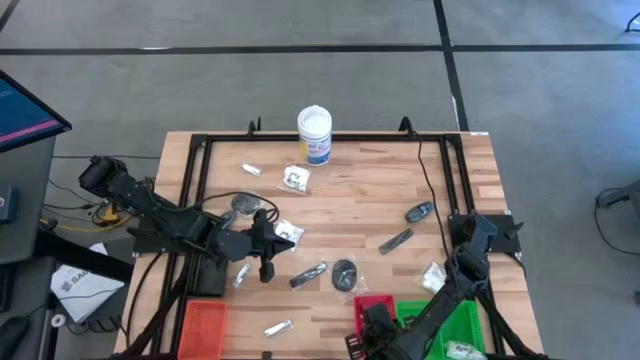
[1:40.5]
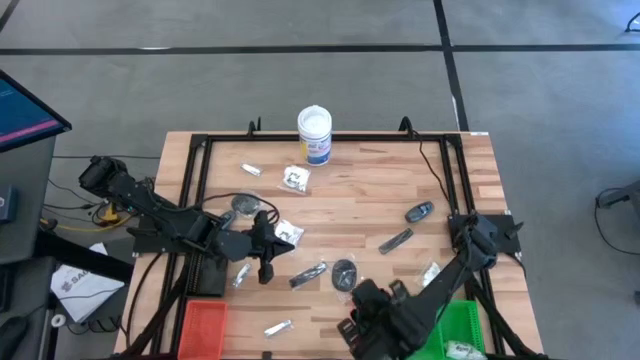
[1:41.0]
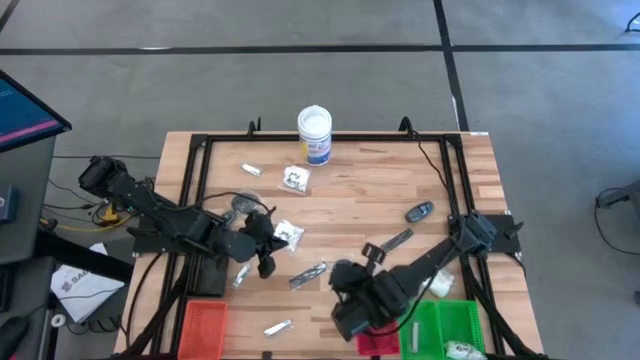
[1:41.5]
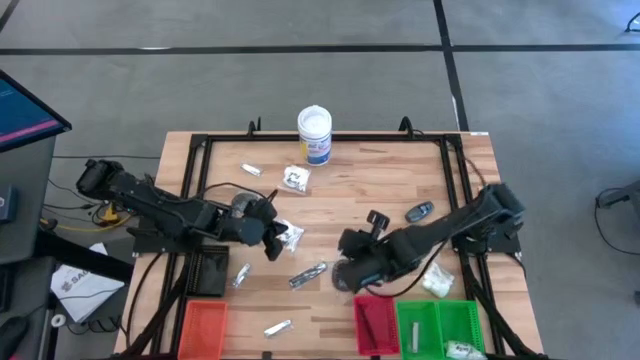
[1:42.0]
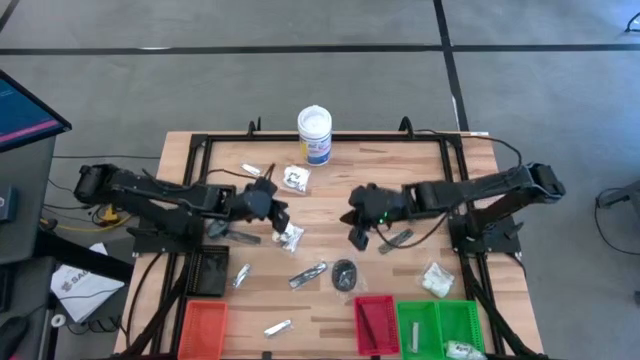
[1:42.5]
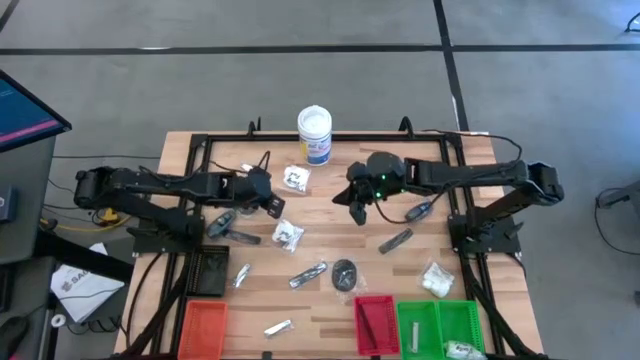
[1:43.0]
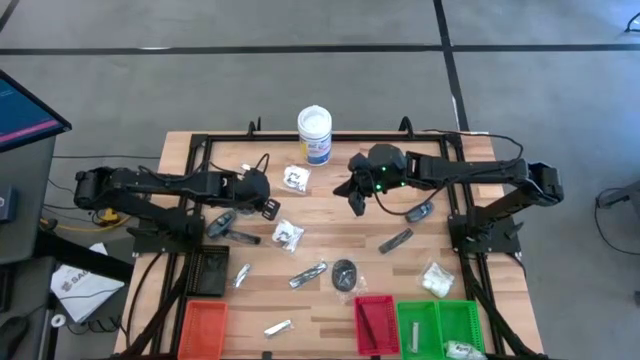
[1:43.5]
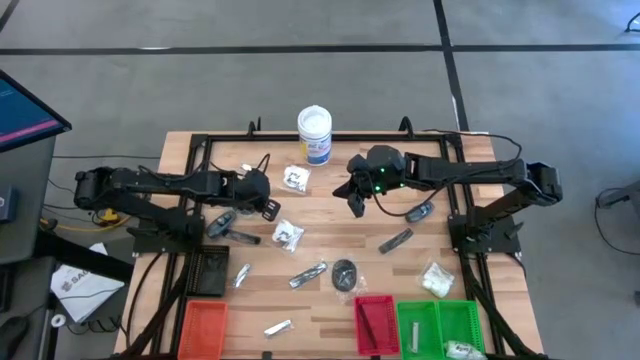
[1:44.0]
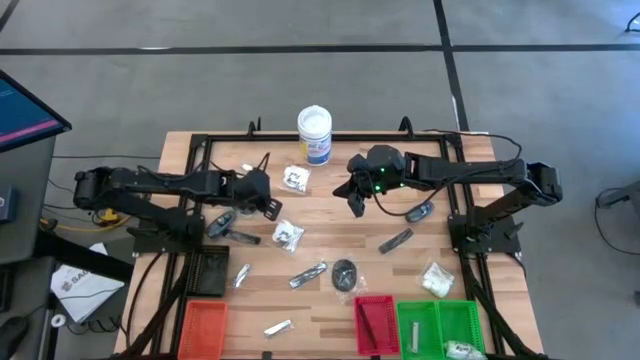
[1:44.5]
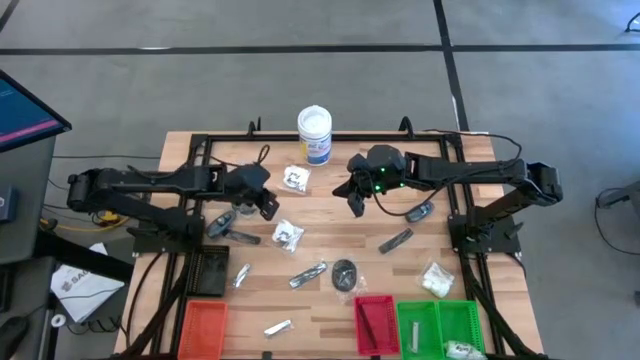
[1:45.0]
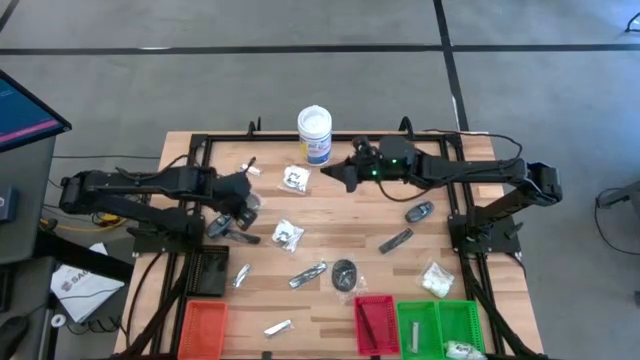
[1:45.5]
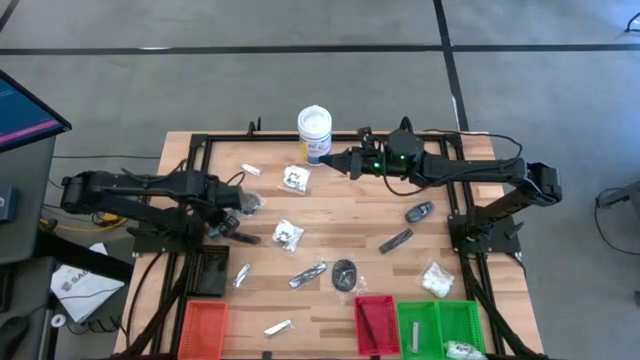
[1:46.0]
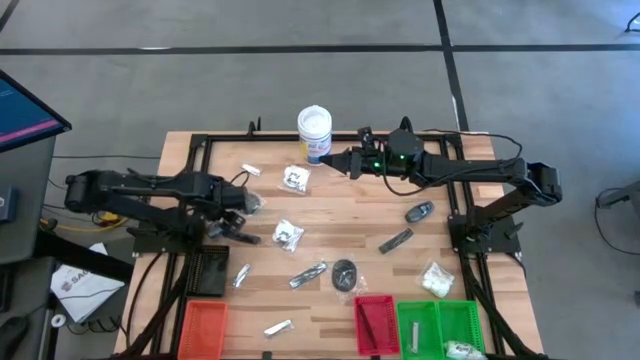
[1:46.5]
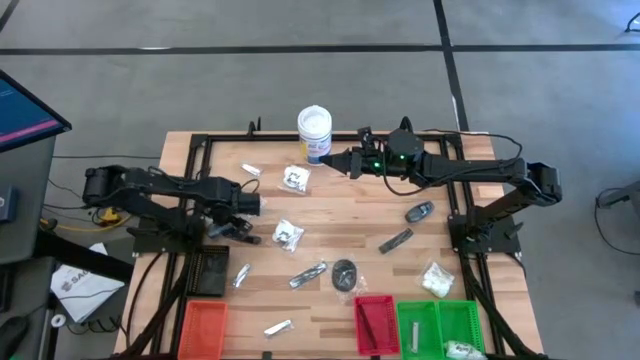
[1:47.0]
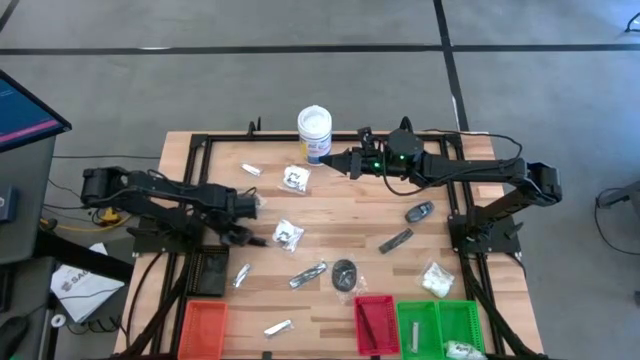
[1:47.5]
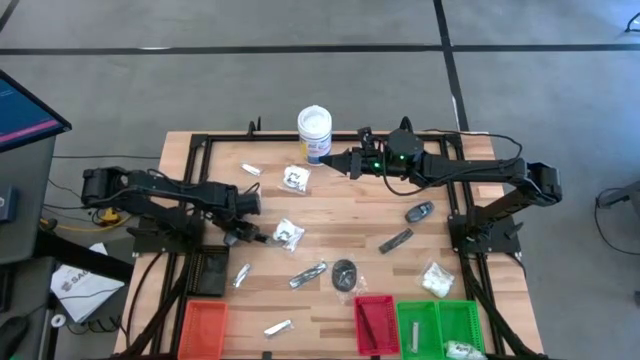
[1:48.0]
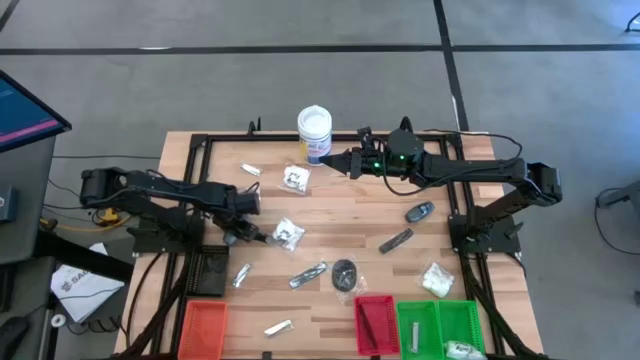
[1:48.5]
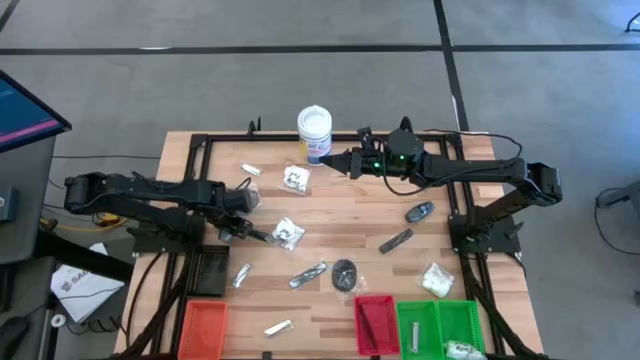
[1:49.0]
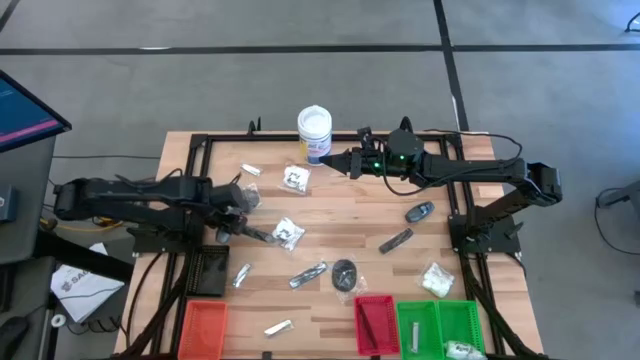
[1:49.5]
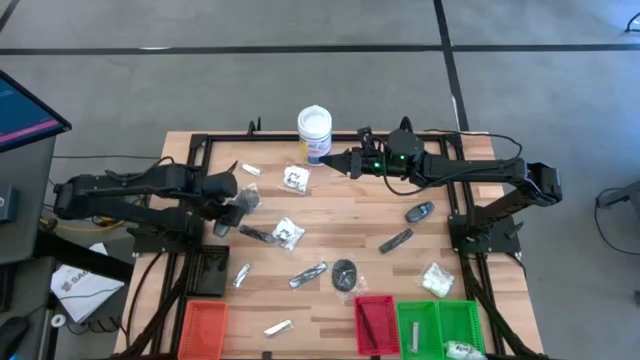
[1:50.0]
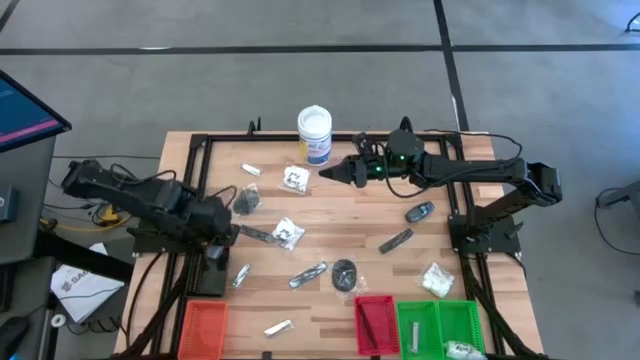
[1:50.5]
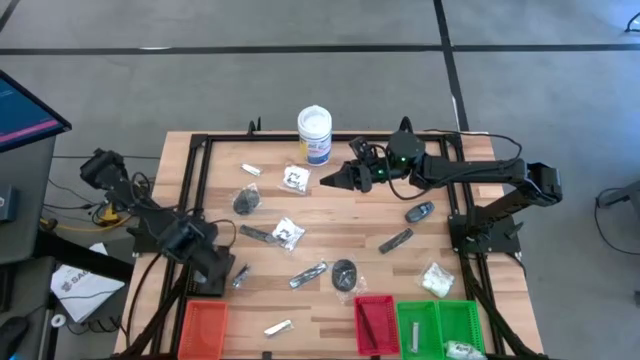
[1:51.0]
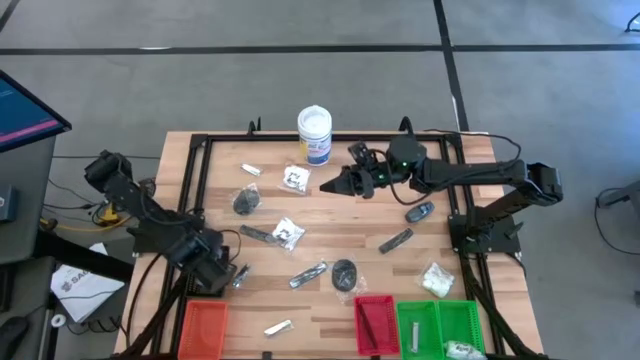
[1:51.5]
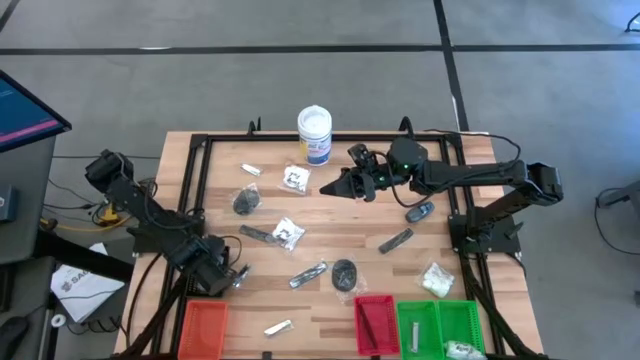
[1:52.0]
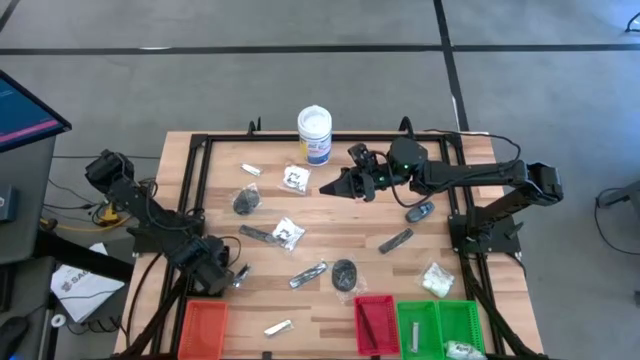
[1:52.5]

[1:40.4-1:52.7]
Task: Pick & Place Travel size toiletries
Put the gray deodorant into the black bin

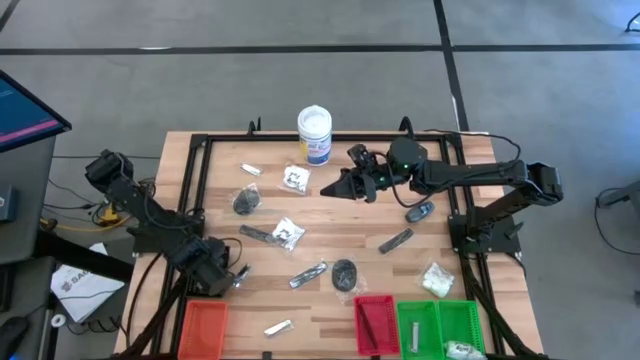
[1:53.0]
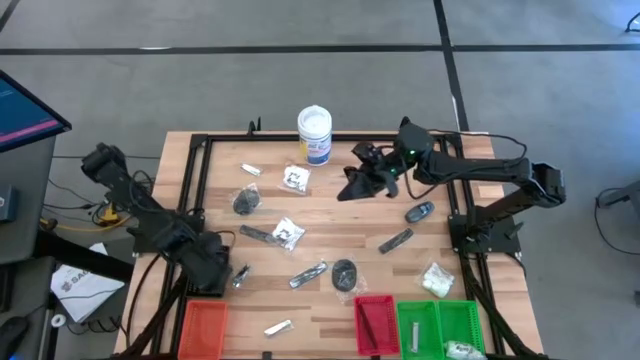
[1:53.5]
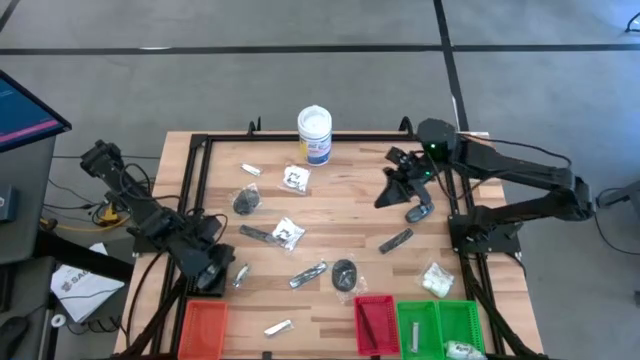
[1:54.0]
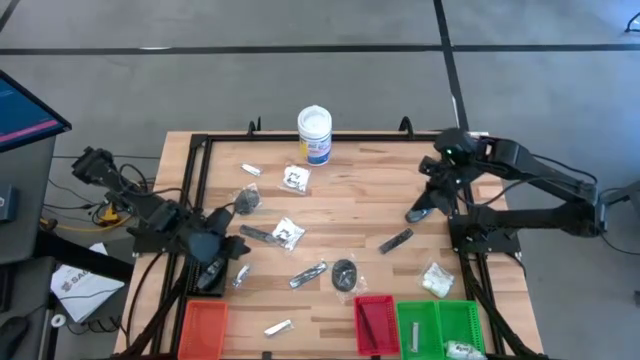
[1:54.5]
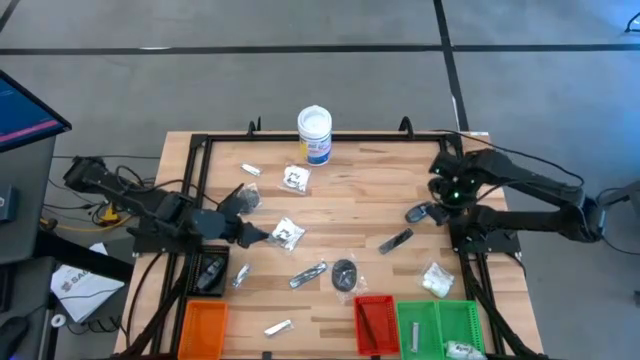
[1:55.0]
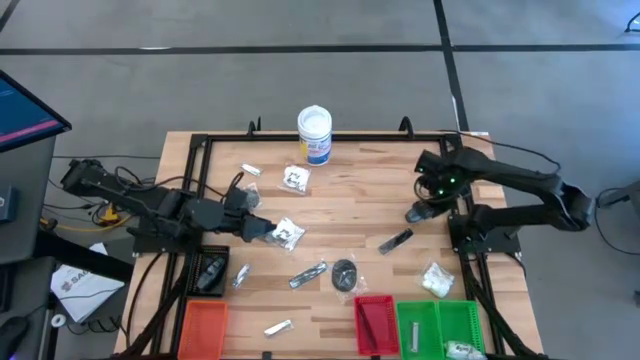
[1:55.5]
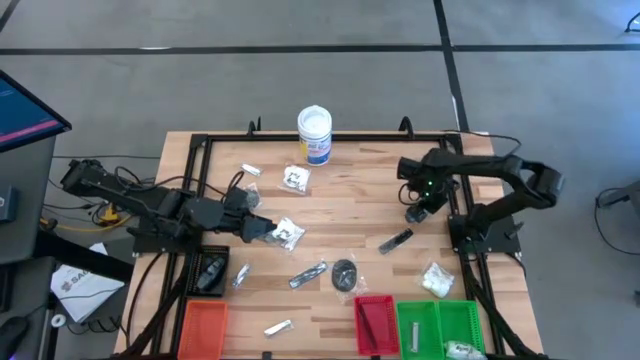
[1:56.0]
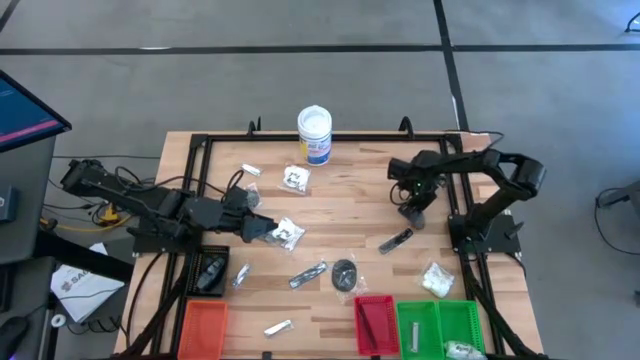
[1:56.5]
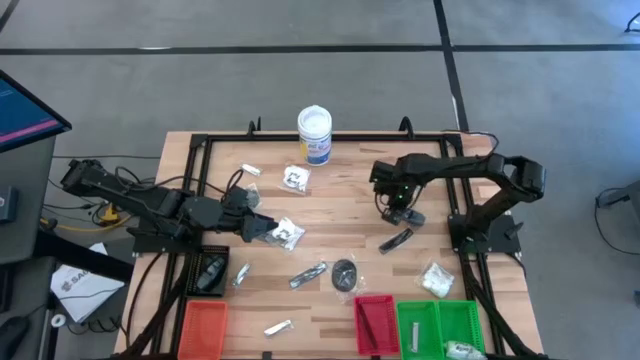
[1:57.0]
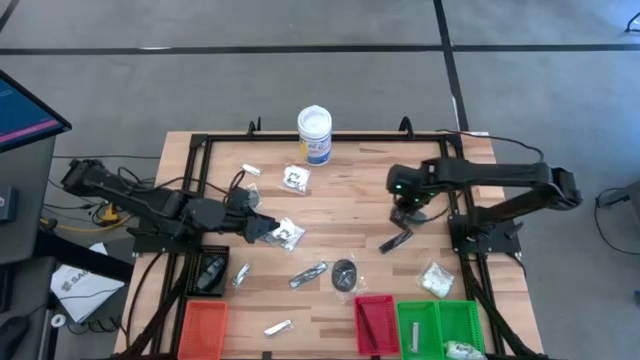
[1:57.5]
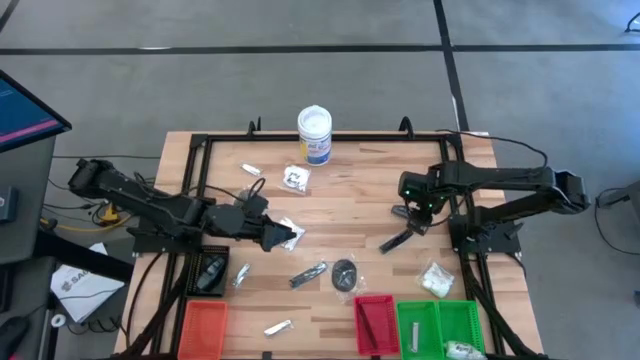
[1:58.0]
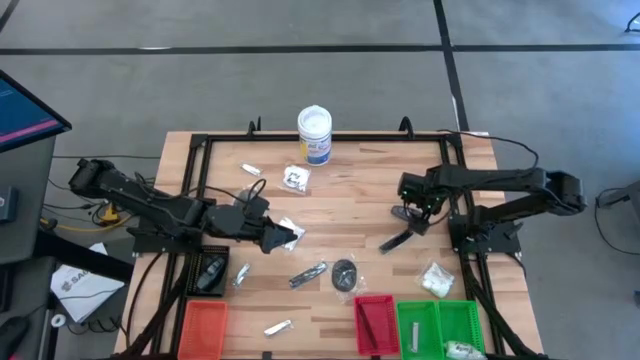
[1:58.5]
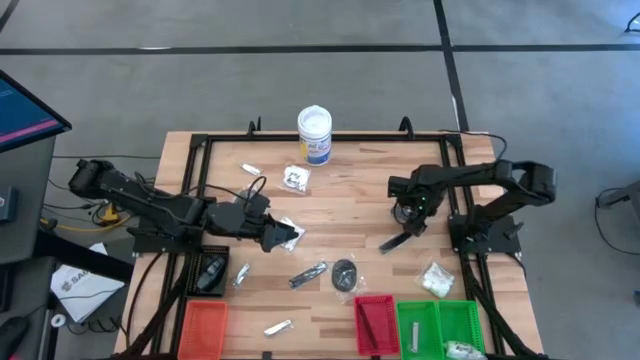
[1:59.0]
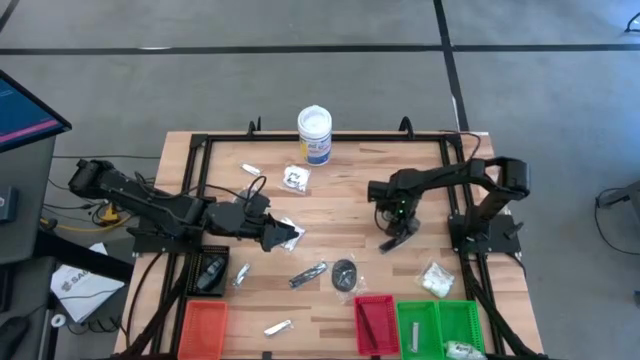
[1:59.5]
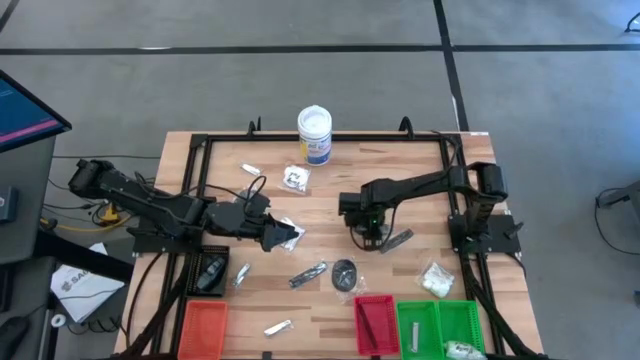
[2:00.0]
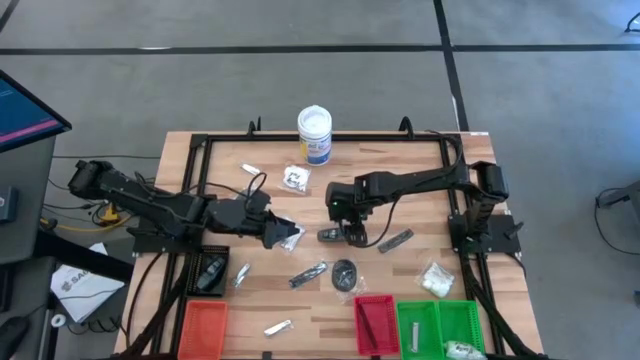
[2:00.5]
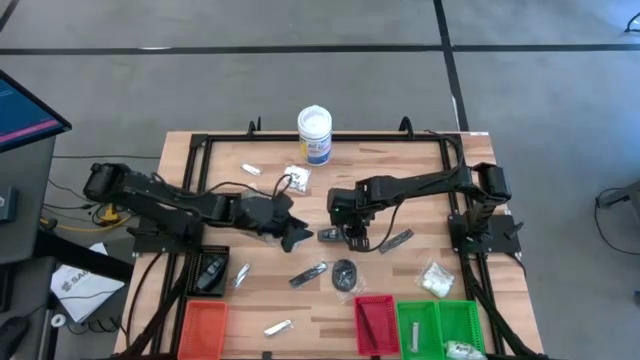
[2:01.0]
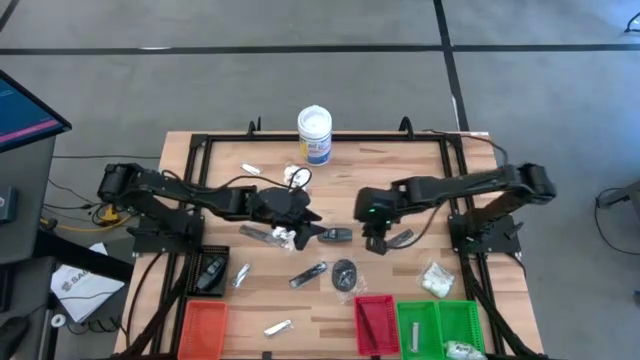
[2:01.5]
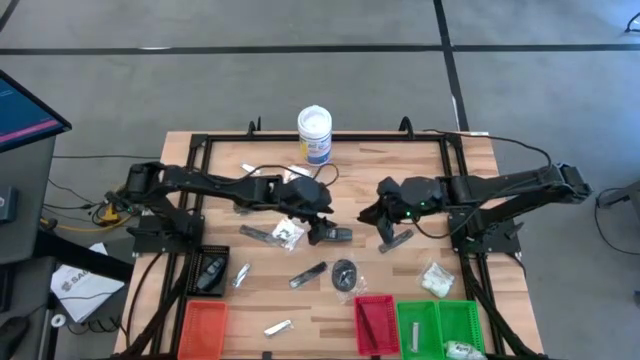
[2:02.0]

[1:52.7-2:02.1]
Put the gray deodorant into the black bin
